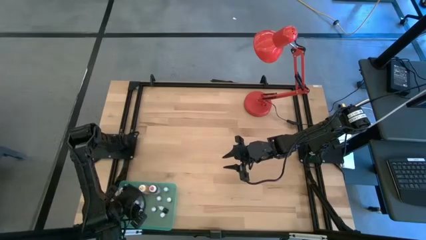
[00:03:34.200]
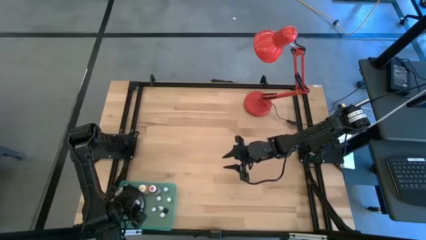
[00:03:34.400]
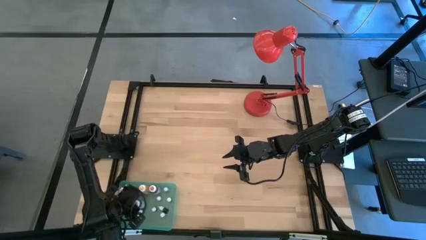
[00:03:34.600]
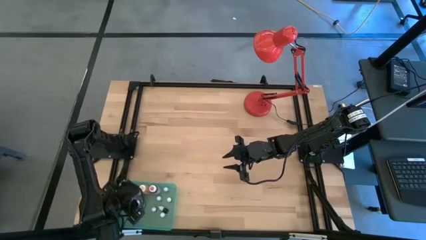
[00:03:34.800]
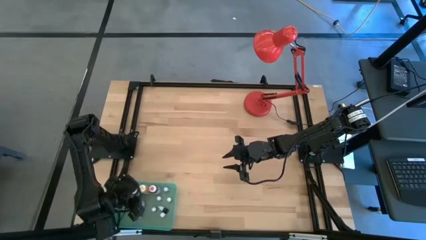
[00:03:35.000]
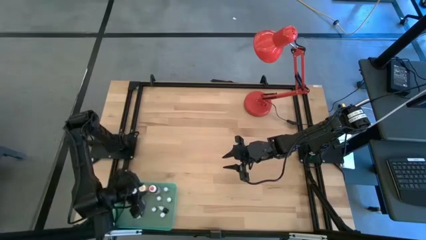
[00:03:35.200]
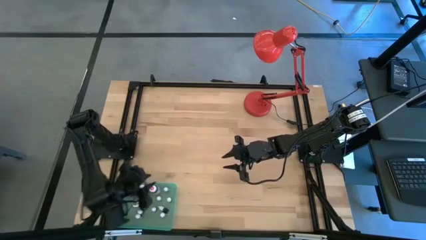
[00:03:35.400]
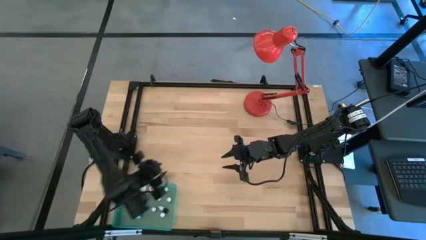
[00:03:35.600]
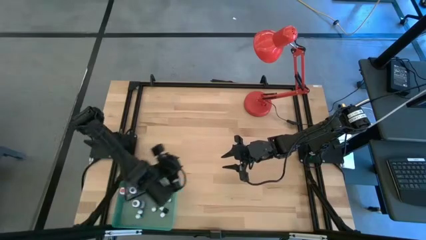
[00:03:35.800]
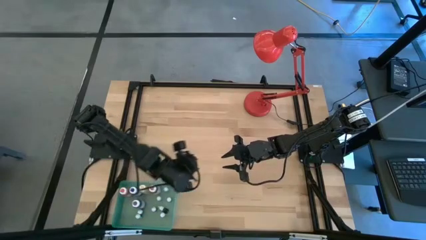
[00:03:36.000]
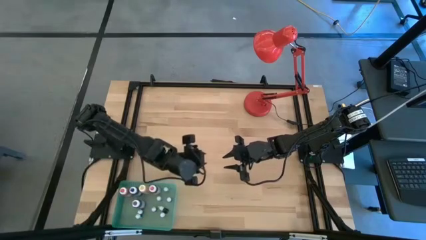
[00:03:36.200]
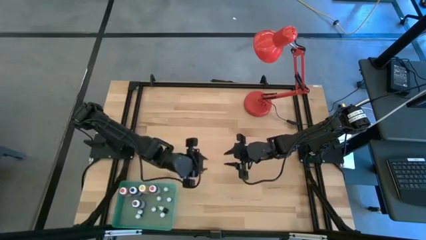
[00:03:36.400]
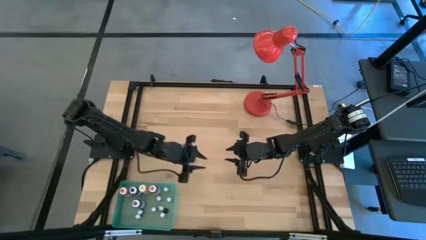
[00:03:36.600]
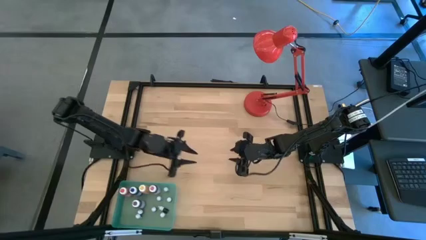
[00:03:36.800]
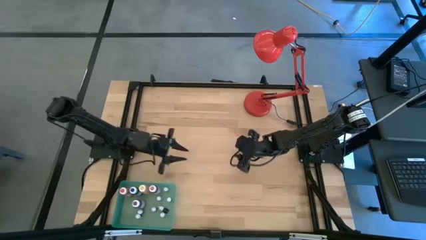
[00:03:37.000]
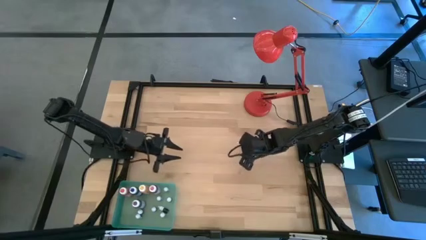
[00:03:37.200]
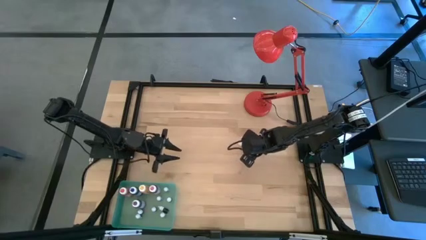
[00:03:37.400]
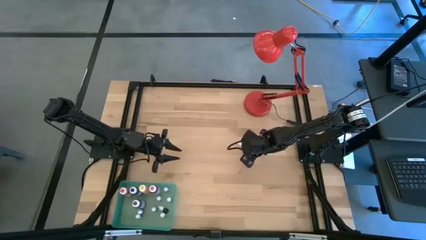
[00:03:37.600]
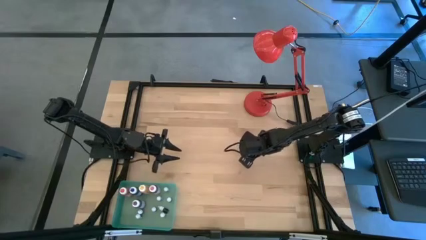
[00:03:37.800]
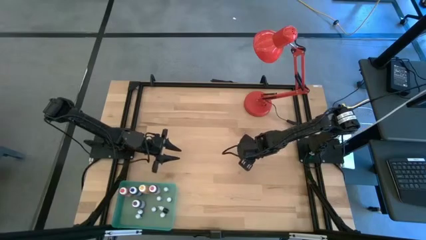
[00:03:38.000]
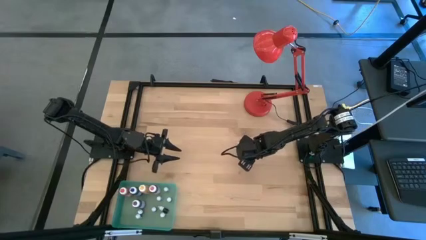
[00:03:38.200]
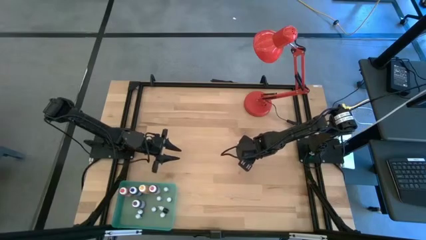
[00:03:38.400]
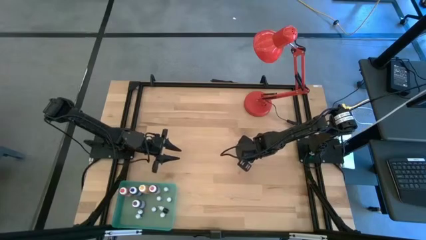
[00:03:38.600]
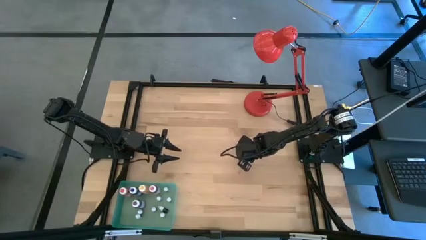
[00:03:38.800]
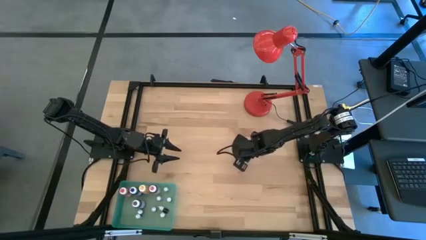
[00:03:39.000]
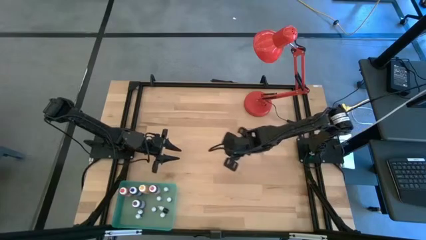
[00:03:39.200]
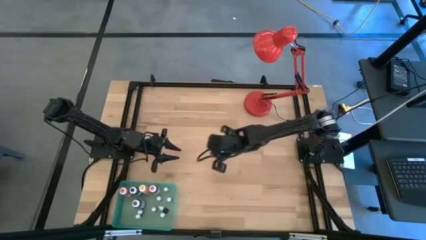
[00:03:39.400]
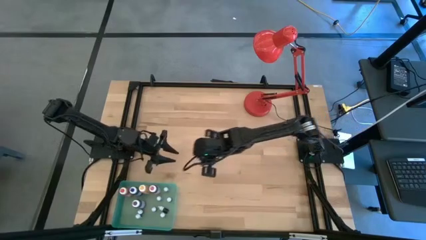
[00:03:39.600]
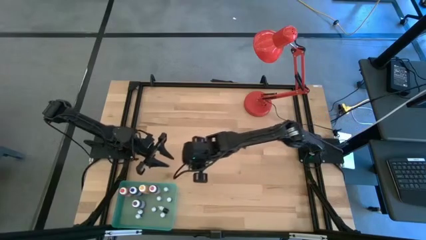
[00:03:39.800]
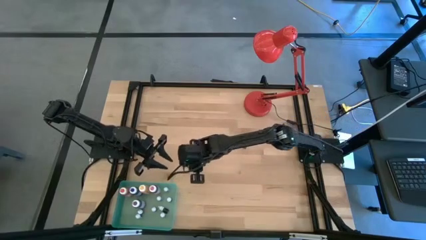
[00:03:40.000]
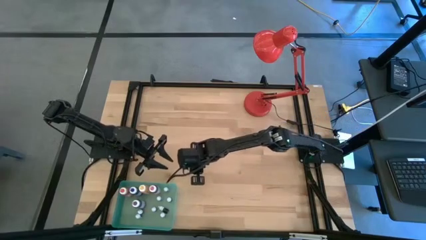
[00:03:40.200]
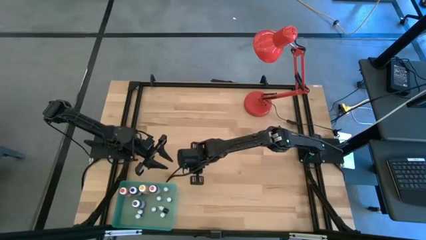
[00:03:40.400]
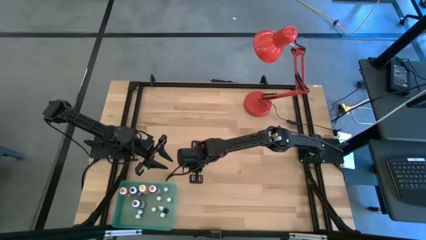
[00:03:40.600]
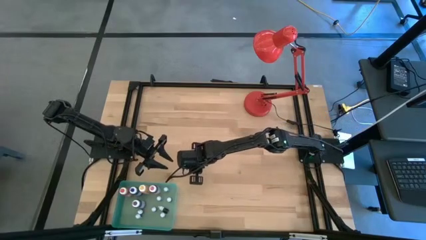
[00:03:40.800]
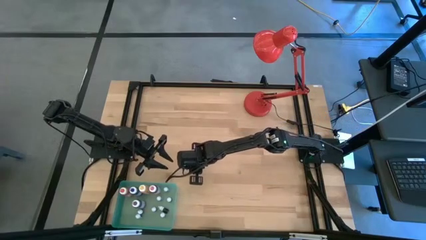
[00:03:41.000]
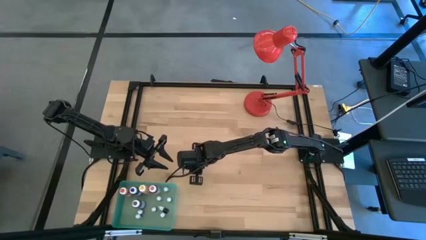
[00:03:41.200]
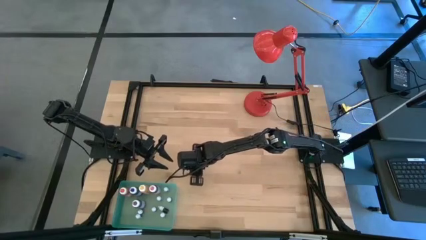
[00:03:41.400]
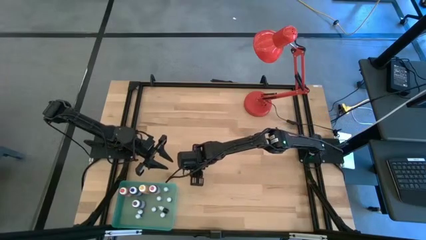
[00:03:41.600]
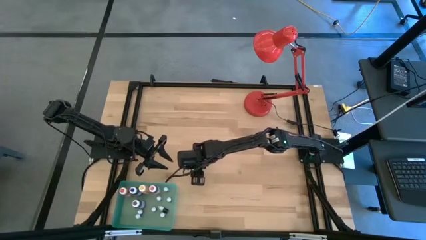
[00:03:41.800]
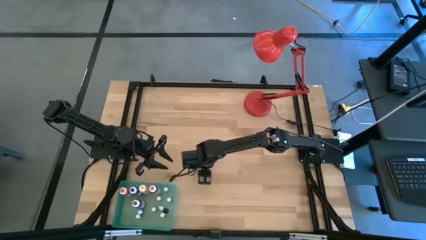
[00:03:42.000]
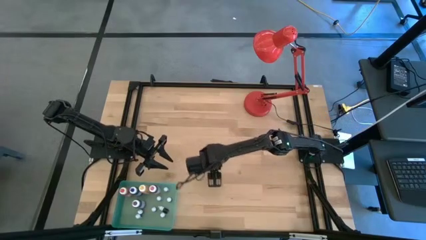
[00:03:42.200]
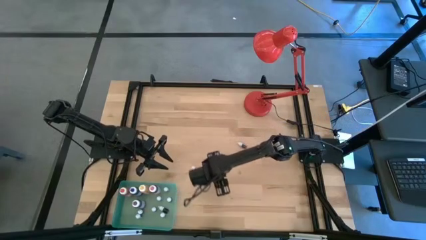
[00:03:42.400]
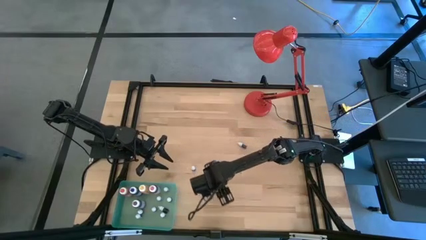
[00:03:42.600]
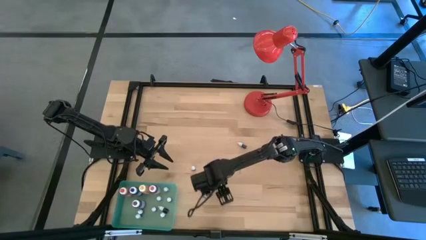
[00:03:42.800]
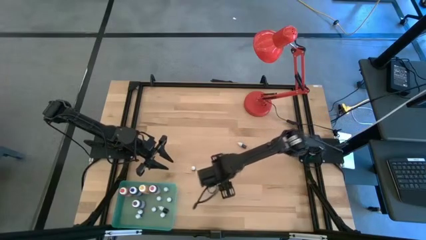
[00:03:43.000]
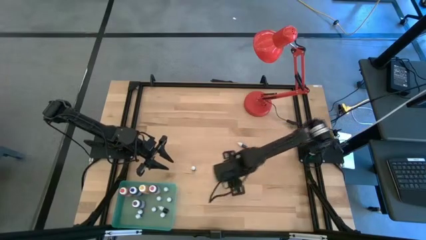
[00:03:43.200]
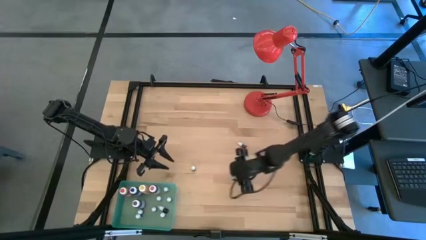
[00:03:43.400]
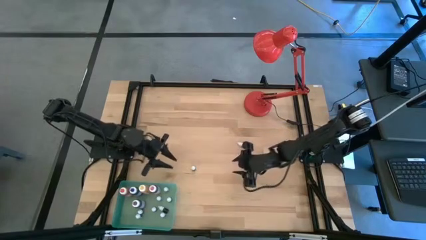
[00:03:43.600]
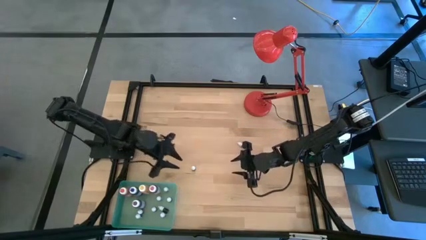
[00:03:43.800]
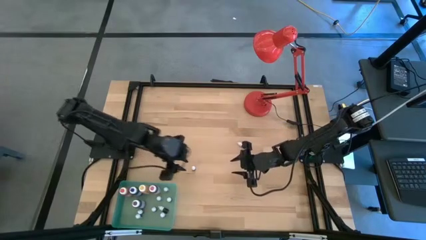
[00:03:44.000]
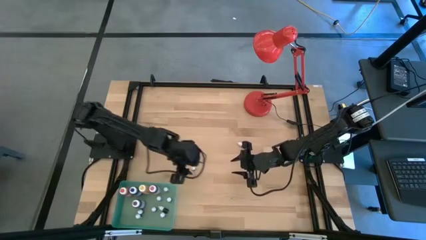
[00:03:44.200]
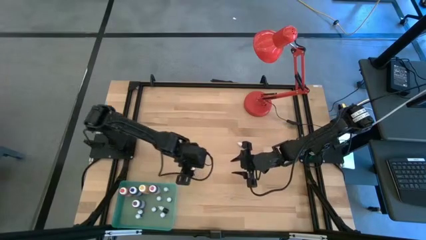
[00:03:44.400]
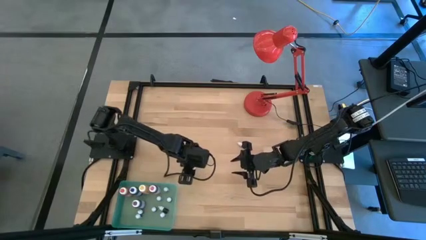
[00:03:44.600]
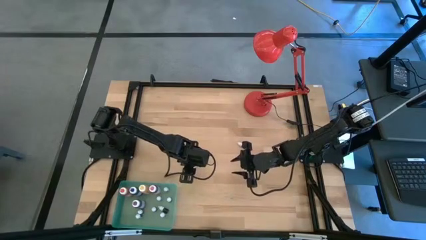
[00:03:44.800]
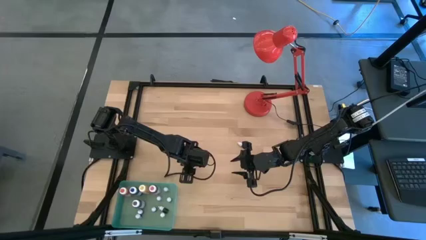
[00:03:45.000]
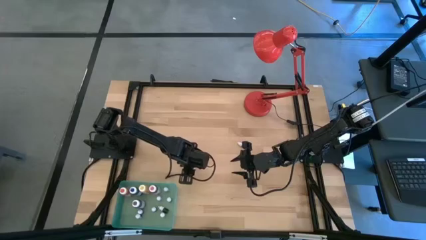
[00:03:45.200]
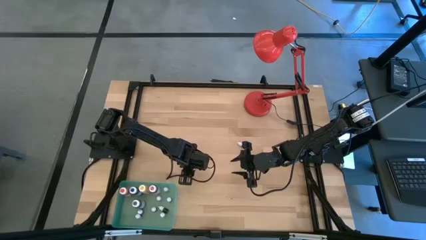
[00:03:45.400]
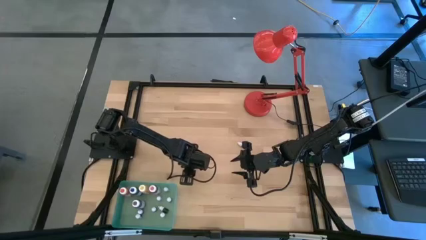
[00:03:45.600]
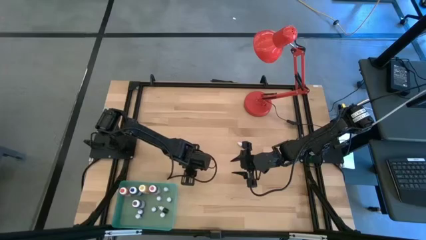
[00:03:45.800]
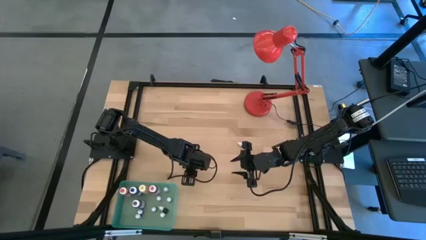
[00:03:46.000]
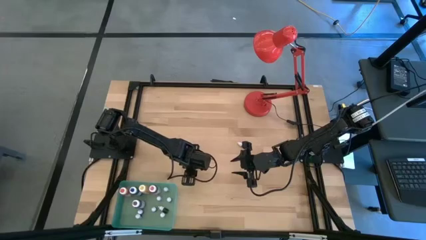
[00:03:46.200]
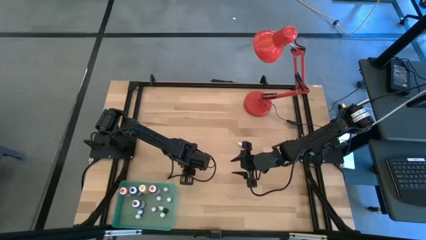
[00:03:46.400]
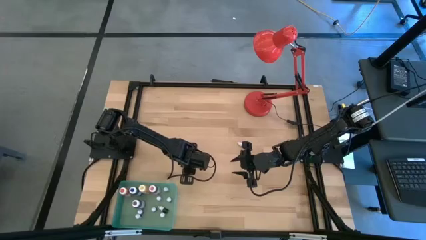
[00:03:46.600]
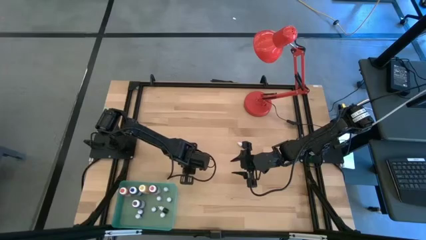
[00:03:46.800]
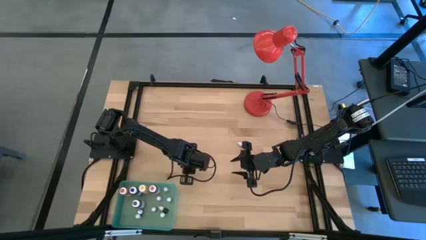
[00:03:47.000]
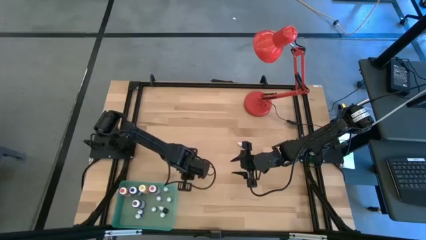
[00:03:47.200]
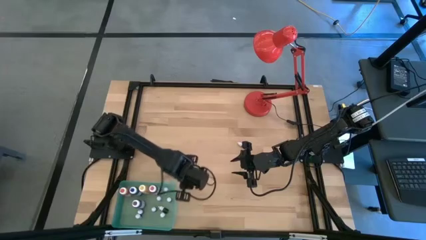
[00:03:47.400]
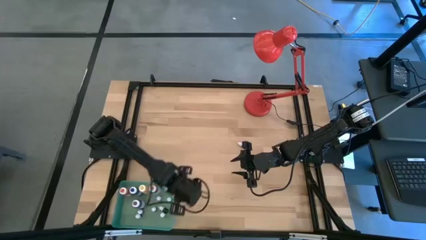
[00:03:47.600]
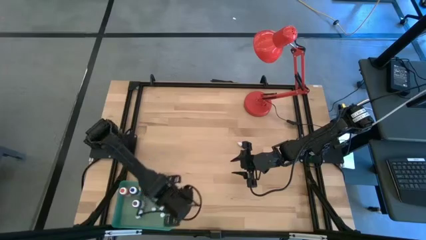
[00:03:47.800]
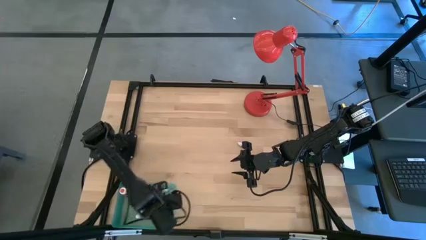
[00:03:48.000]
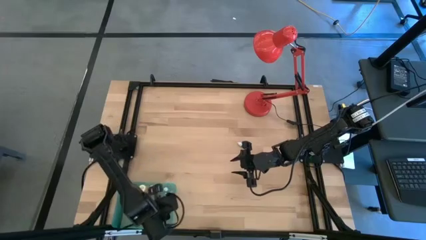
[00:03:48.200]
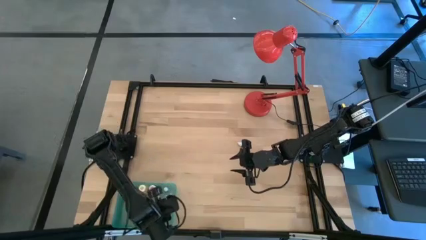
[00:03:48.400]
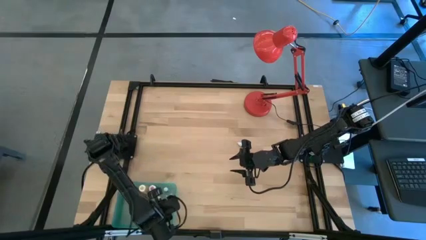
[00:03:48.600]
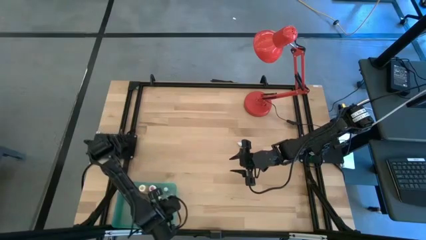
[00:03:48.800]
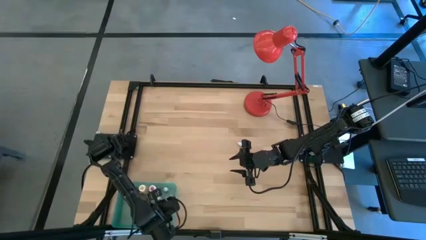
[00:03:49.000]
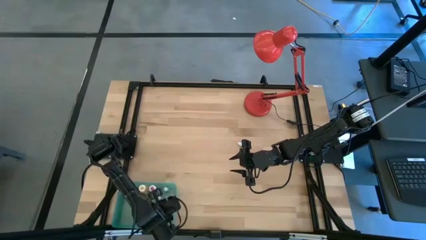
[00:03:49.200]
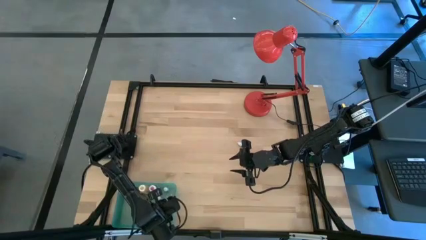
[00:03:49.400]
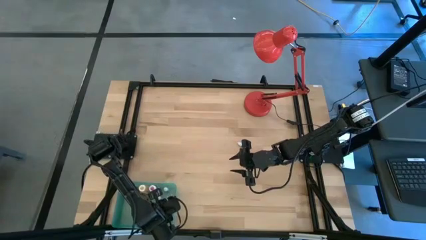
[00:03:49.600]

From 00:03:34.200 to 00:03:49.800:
Task: Pick & Place food coloring
Put the black food coloring into the blue bin
